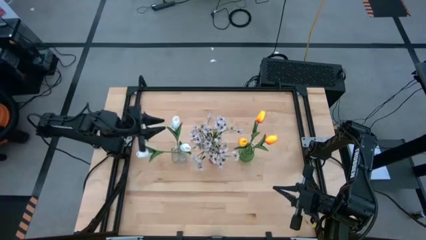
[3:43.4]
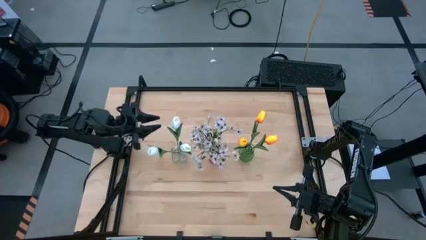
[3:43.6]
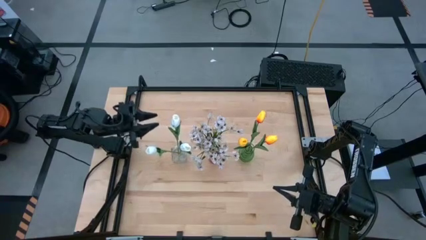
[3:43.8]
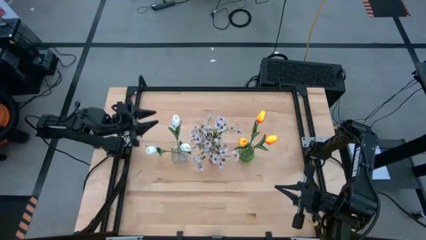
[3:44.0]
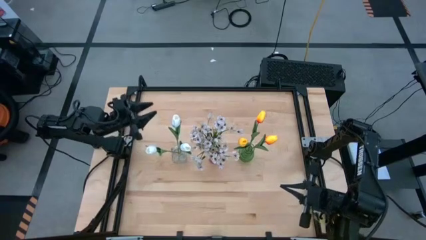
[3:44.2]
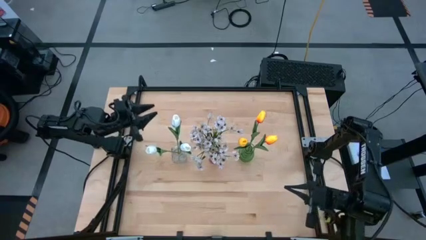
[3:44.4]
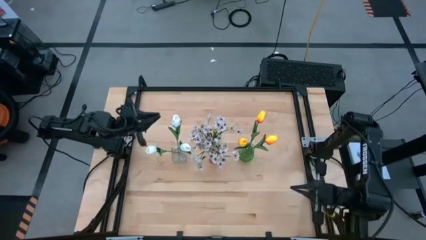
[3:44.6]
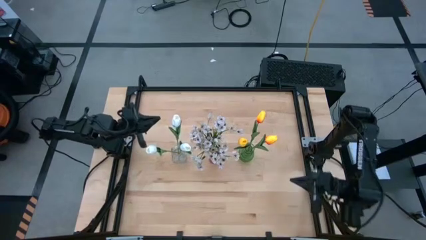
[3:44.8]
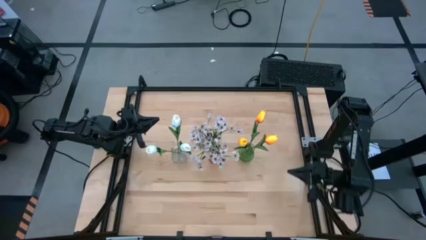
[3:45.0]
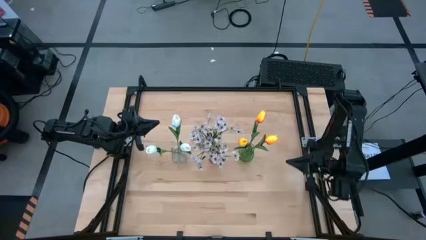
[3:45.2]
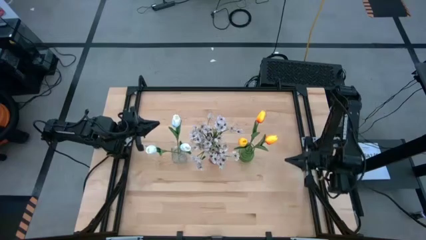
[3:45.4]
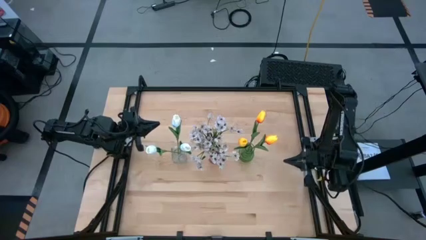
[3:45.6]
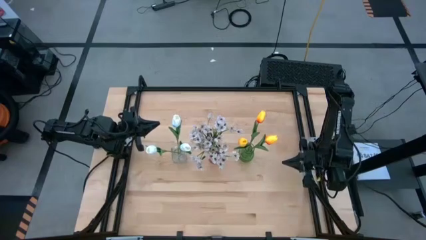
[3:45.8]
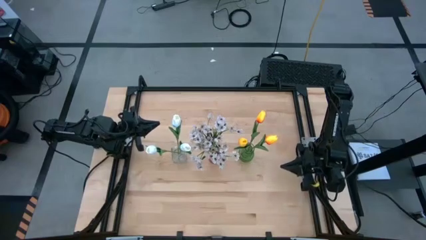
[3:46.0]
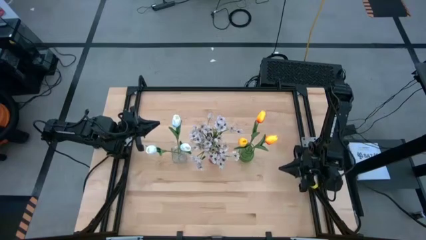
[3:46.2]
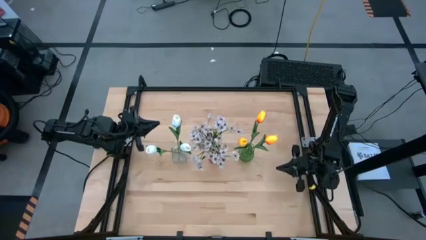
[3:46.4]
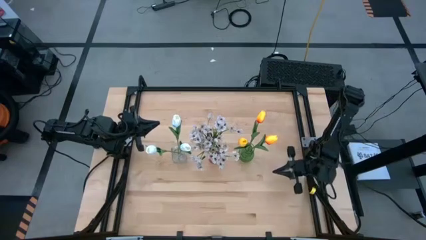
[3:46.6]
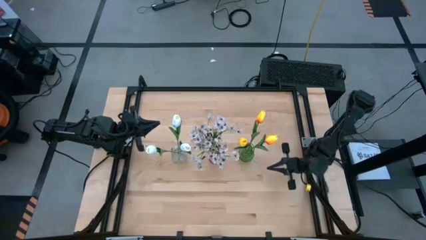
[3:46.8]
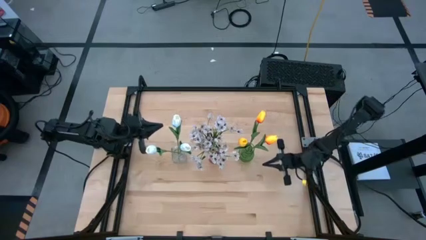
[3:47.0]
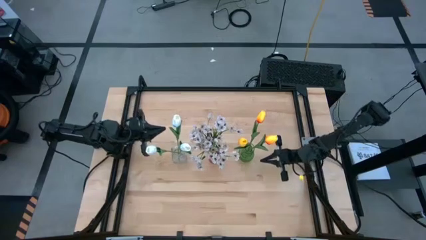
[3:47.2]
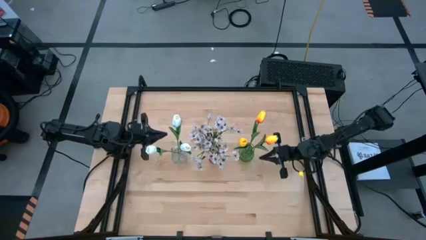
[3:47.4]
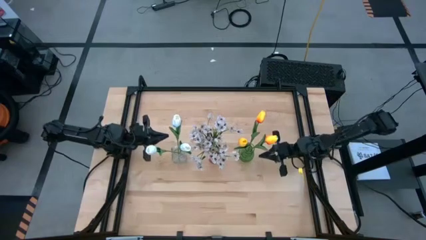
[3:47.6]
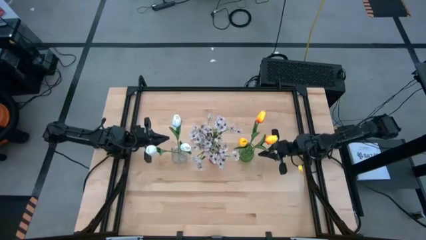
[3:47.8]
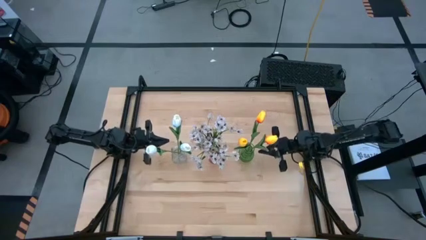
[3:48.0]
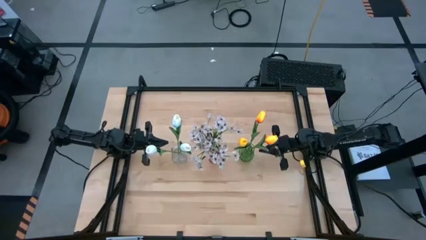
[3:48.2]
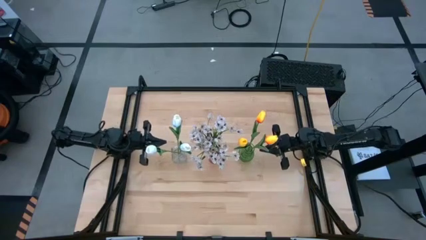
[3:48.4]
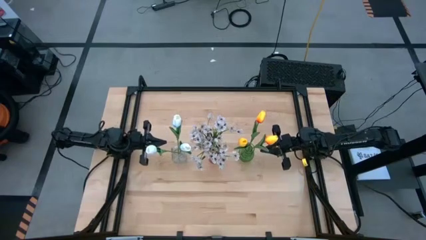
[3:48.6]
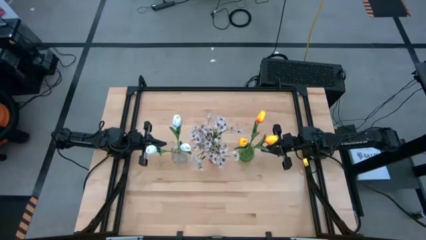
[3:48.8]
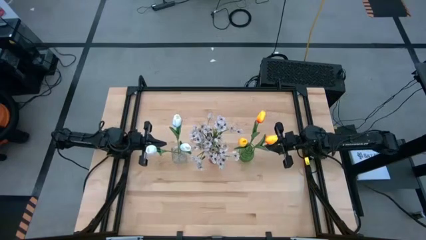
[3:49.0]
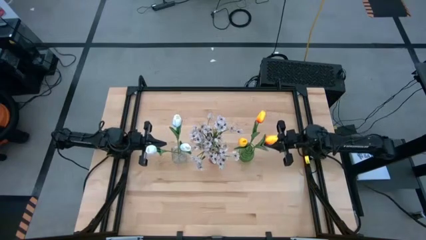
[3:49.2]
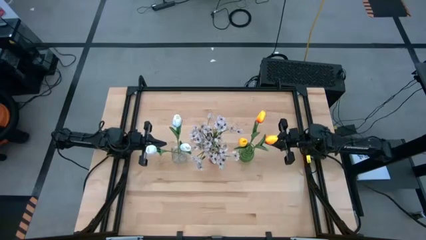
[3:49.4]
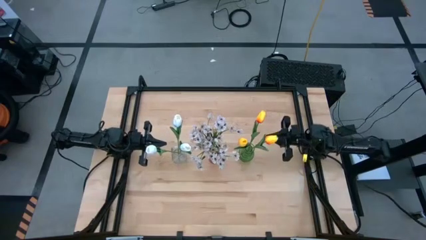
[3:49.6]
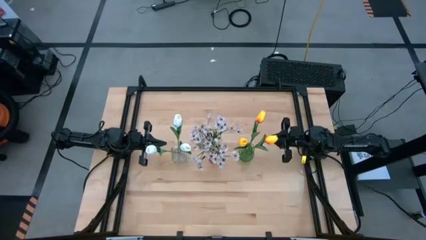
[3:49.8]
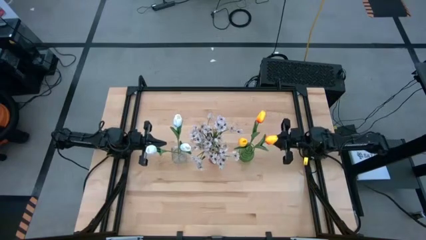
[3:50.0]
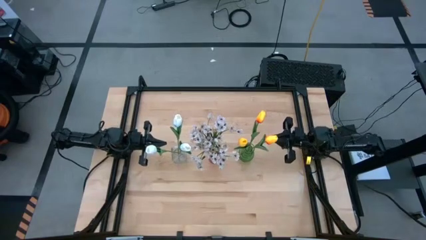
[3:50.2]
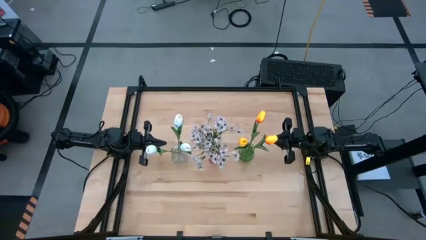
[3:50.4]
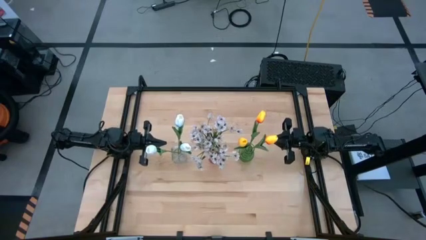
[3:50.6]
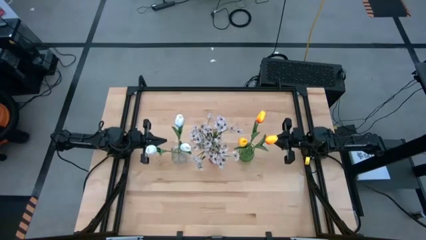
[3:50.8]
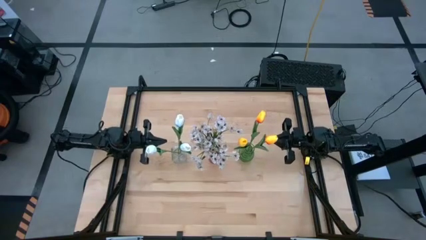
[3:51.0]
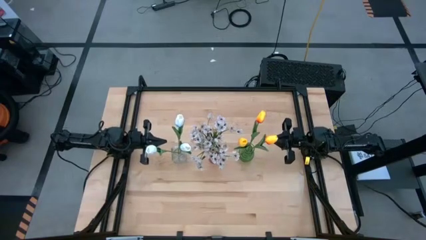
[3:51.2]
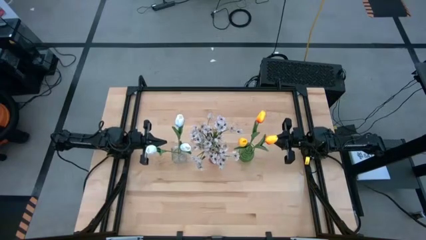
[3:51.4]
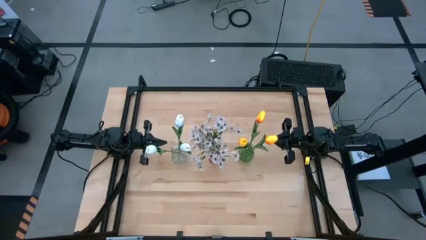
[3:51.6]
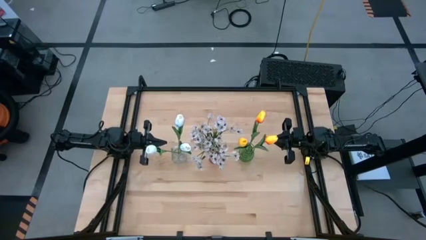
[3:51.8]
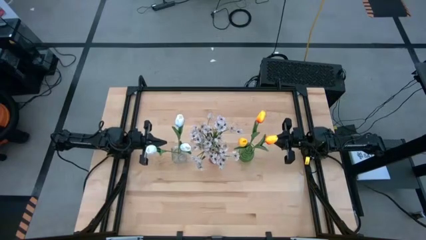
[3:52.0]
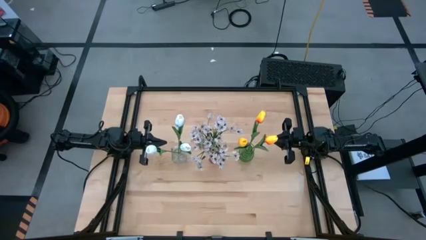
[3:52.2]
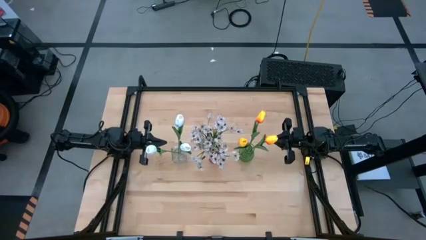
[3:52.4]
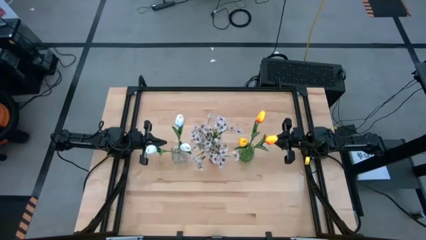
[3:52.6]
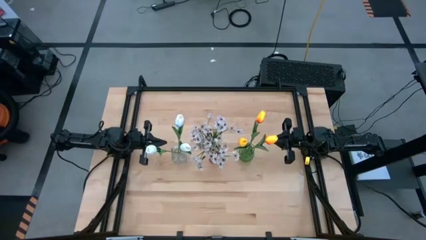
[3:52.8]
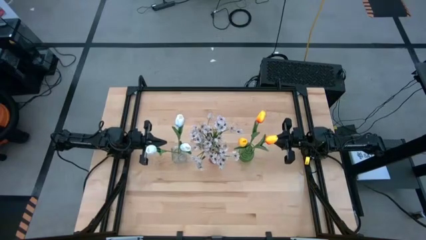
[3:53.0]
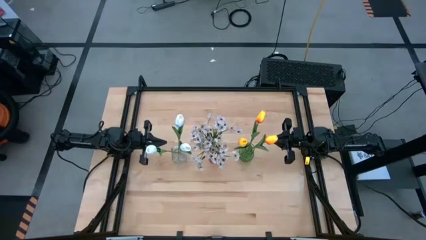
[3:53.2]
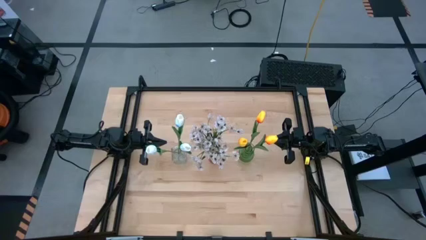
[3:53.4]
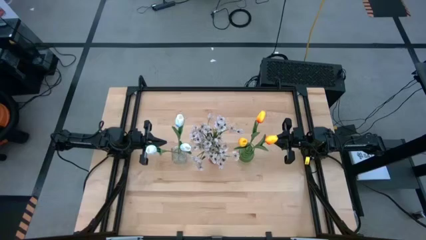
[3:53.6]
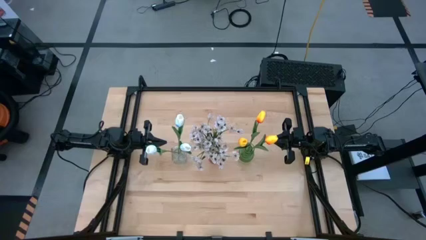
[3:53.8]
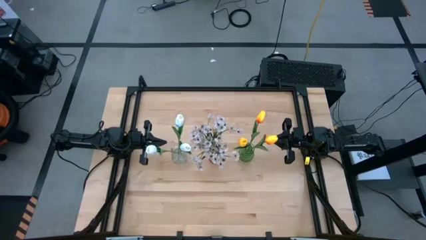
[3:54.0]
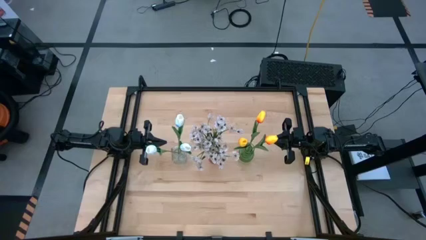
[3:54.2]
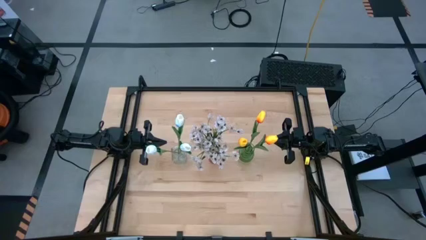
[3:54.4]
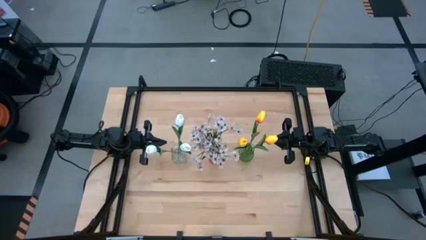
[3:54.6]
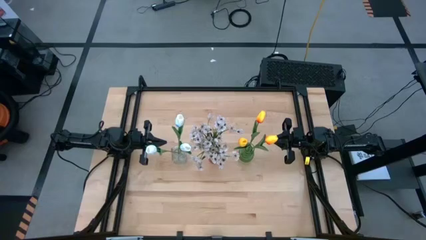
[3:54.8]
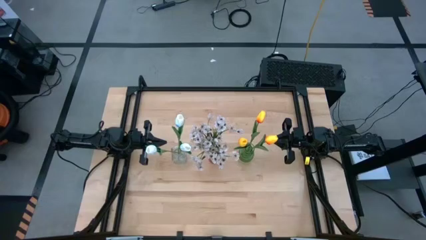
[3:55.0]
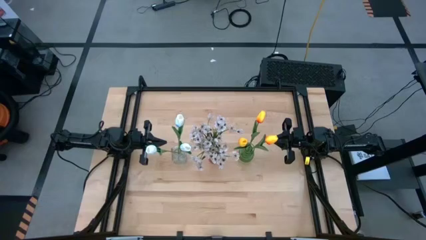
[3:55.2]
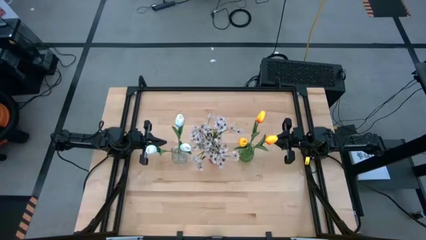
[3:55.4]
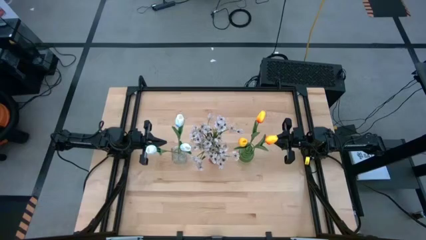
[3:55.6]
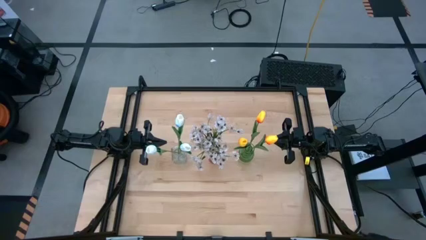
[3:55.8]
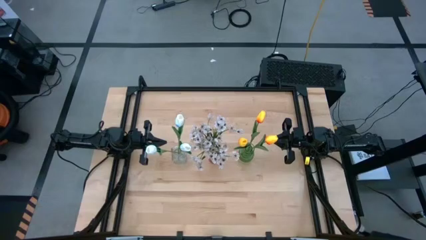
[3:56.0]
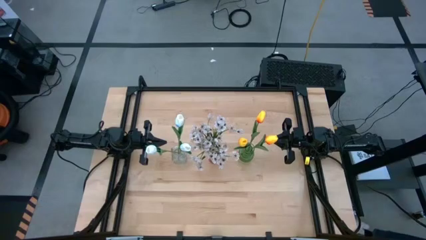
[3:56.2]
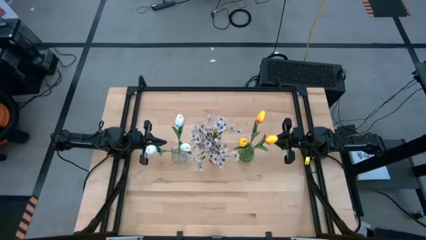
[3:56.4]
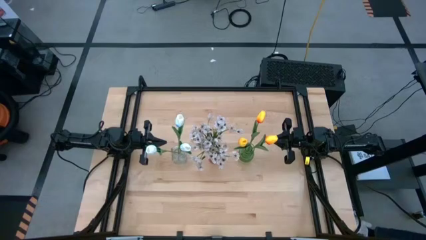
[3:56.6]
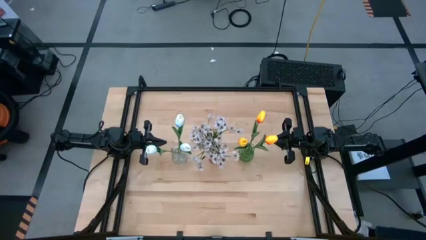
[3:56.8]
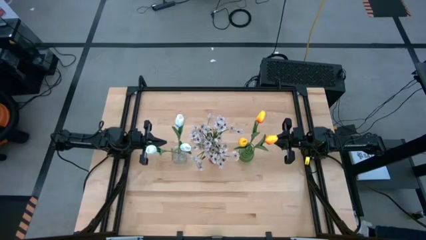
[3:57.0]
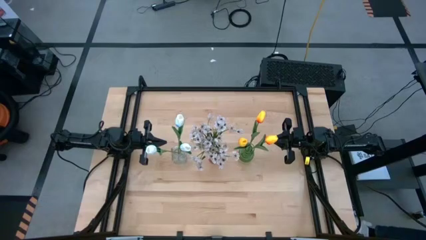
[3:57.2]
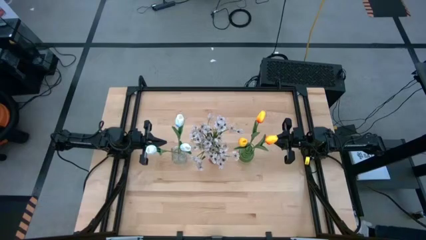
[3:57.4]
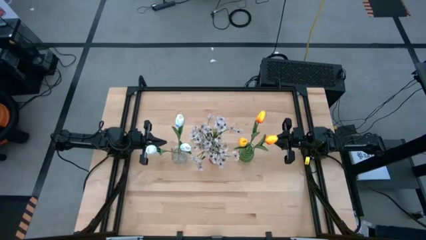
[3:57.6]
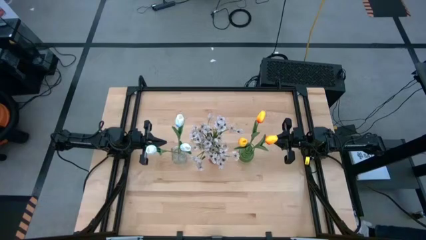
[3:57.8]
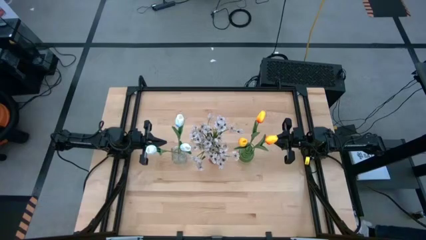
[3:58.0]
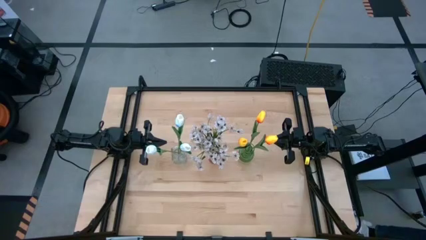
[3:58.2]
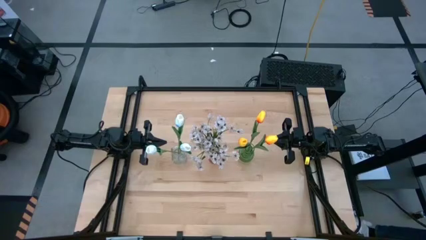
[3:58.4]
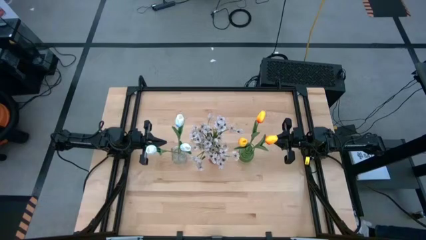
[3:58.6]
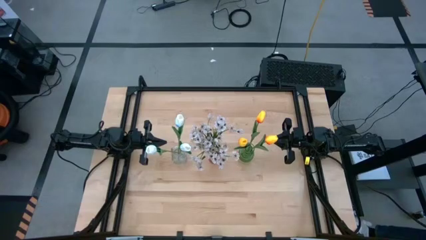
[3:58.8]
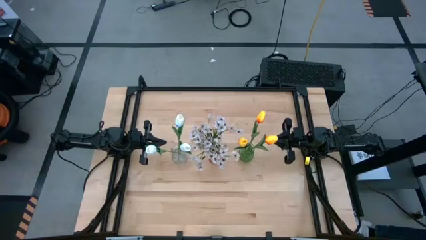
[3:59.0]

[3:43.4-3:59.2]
Task: Sort flowers into vase by color
Return to Home Position

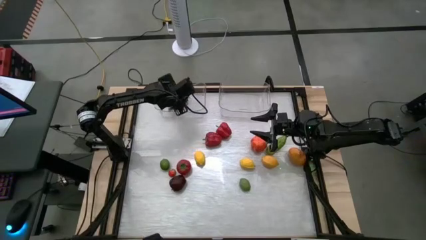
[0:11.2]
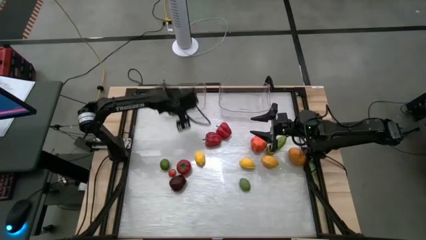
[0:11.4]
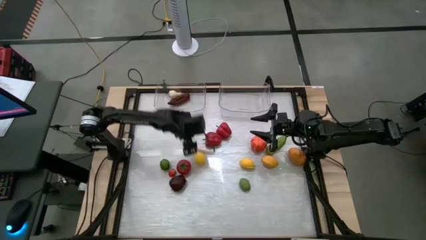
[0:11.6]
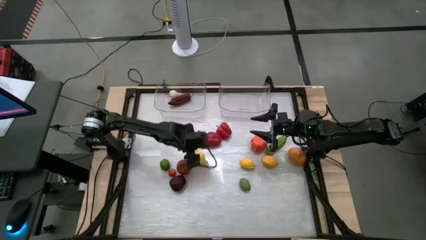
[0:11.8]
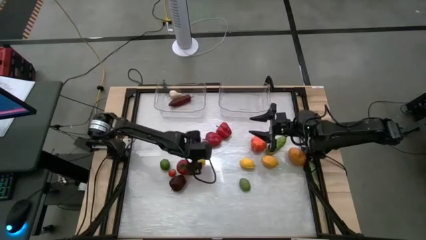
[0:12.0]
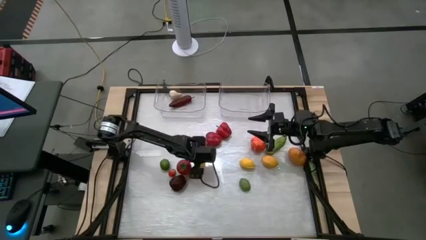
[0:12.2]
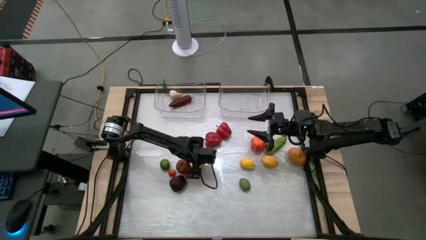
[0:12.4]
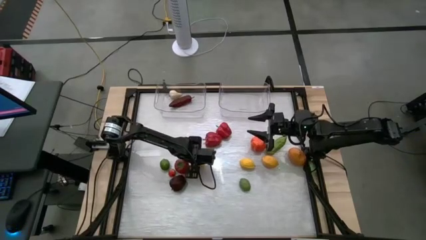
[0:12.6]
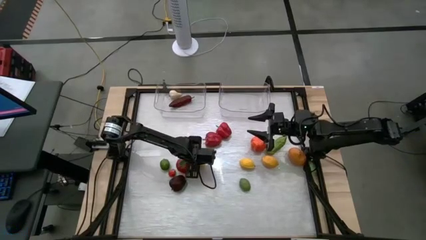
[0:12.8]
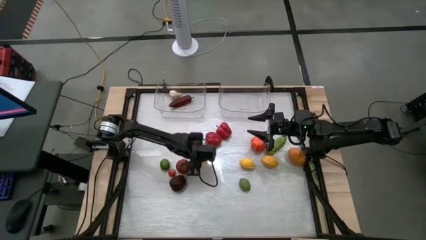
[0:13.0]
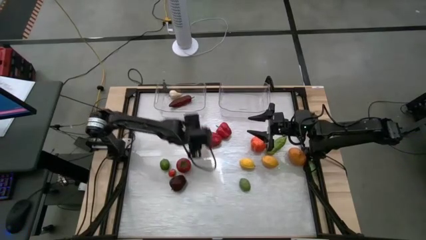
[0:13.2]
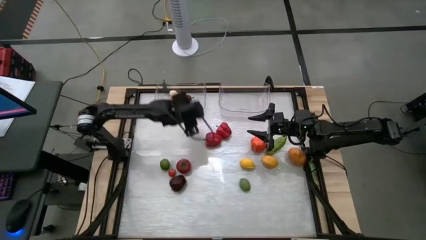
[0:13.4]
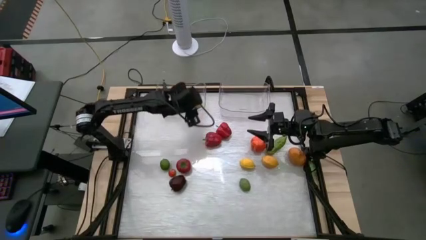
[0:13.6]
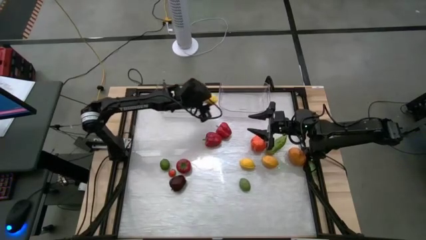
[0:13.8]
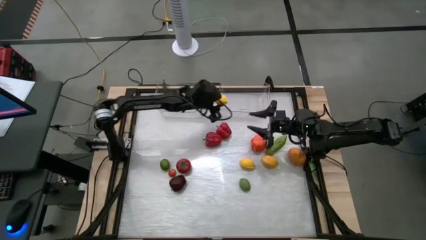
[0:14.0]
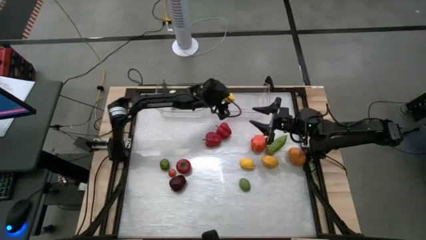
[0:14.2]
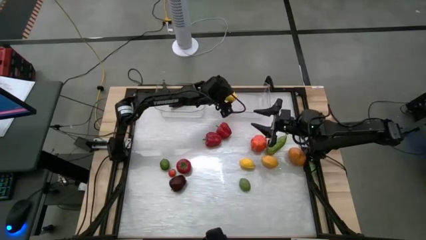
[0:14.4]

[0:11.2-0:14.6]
Task: Sort produce into baskets
Put the lemon in the container
